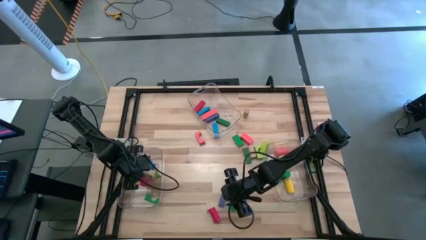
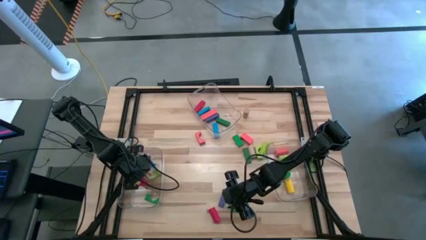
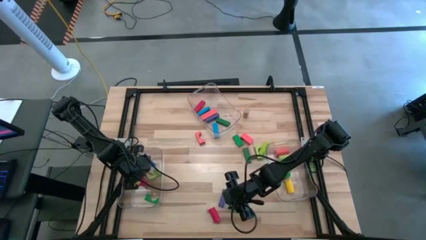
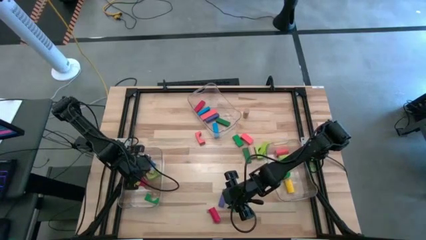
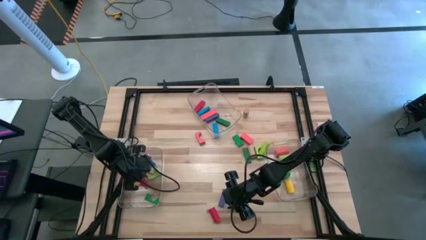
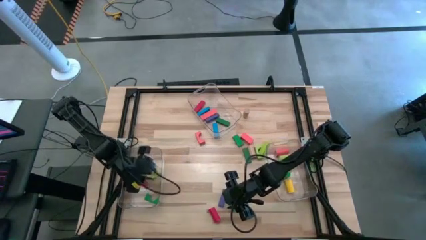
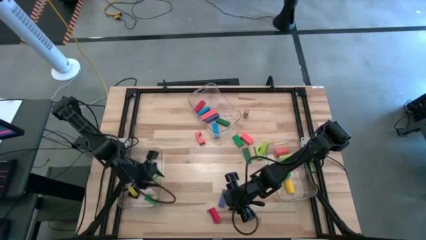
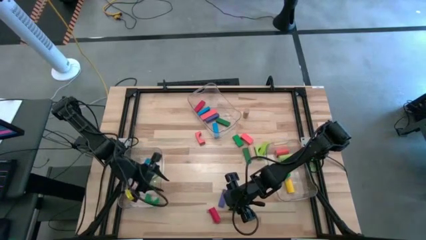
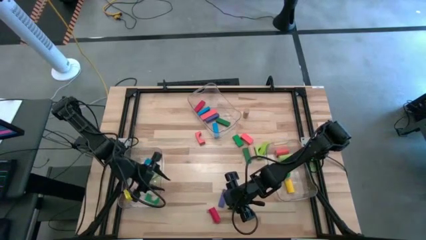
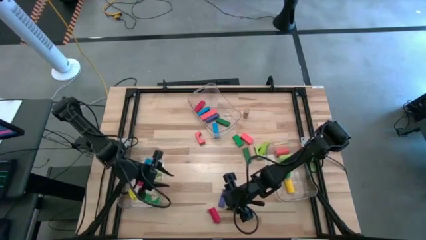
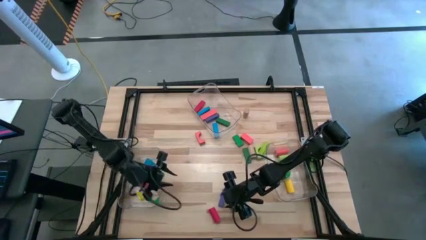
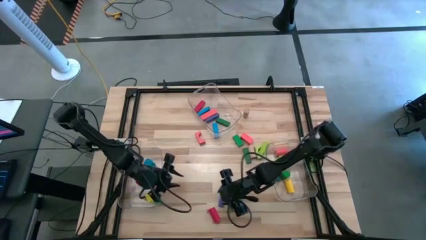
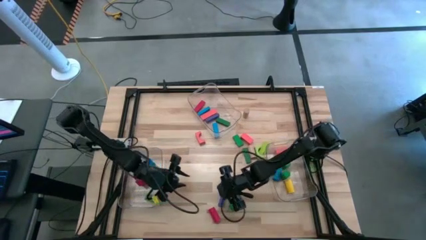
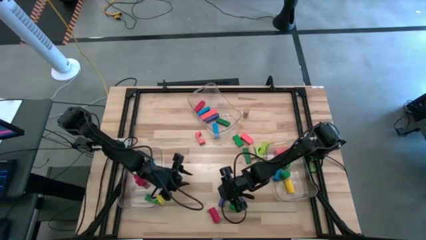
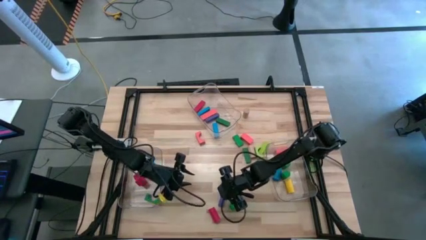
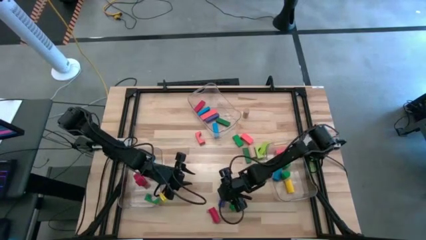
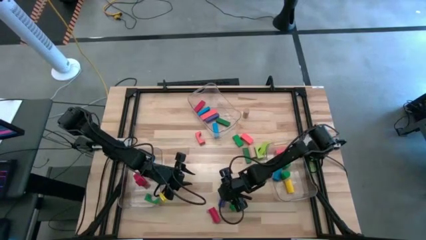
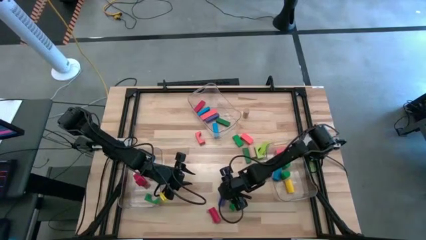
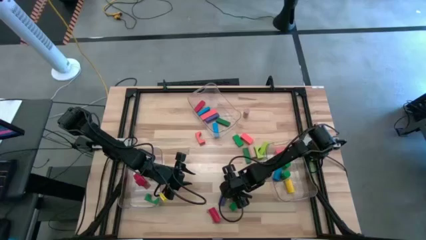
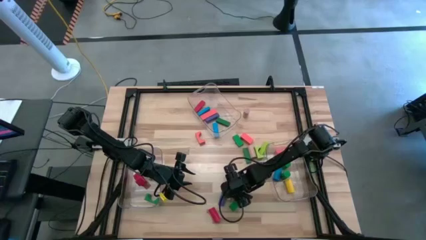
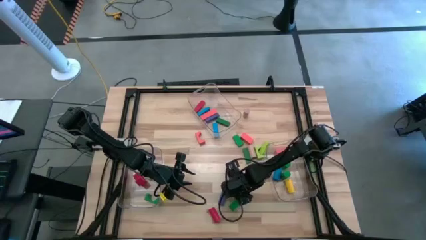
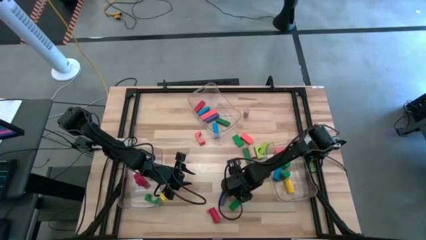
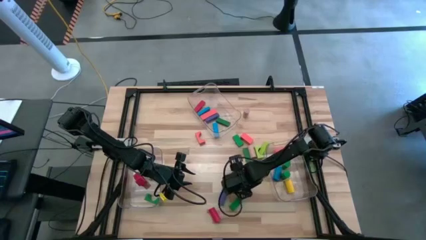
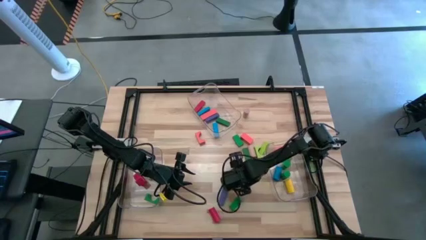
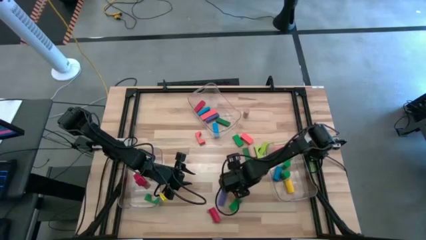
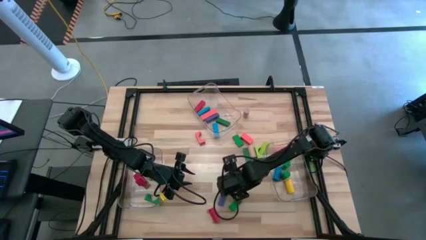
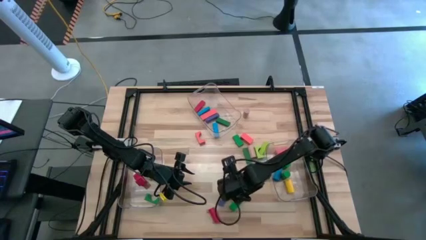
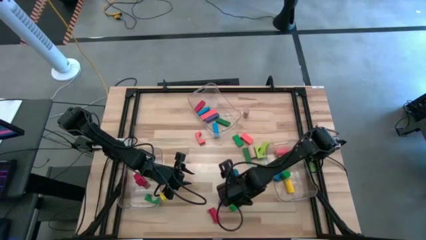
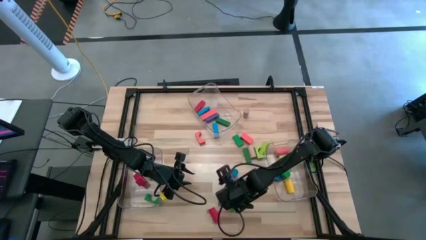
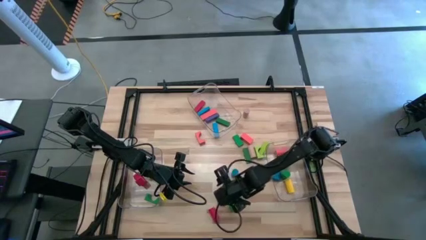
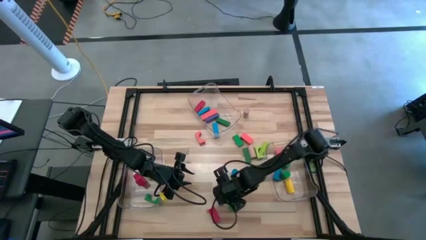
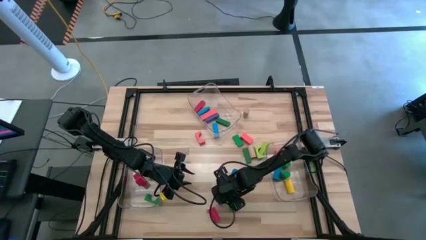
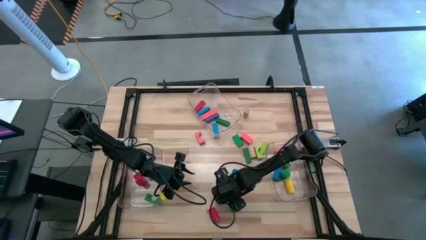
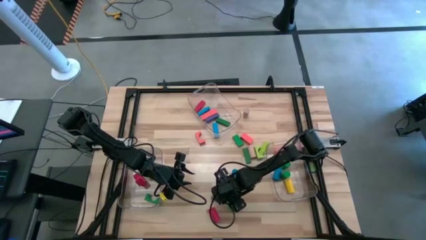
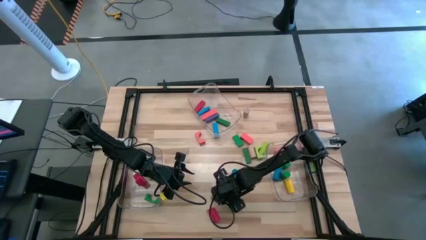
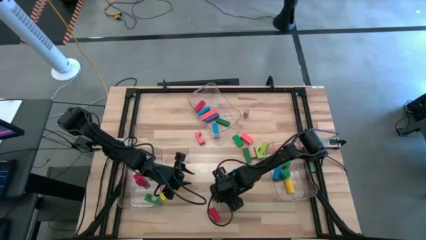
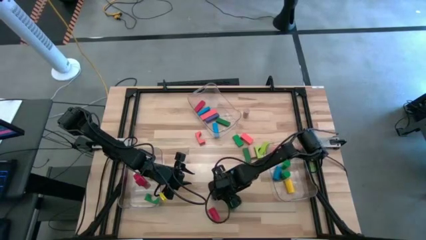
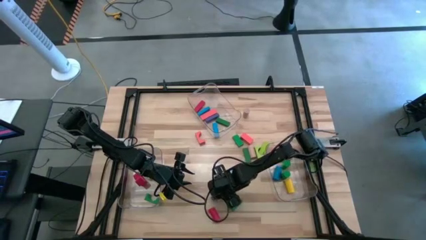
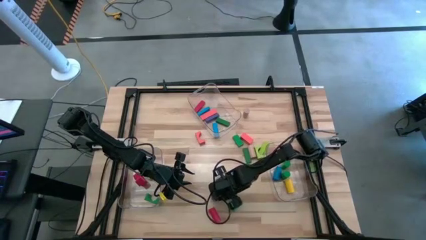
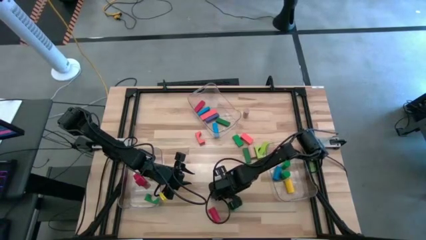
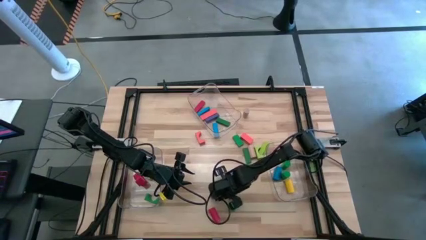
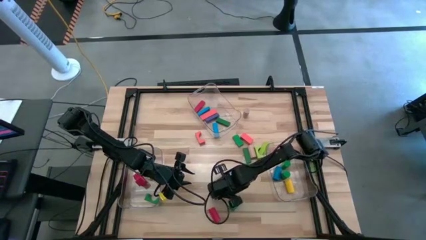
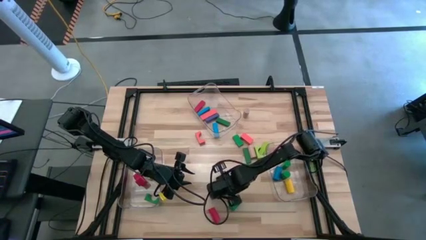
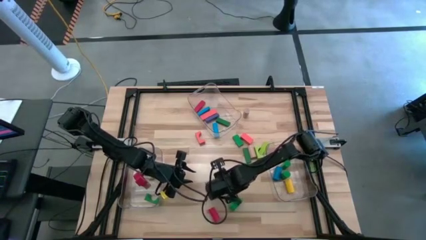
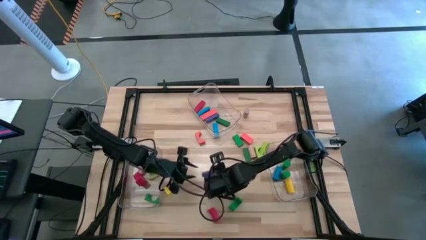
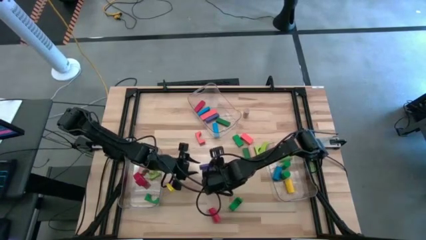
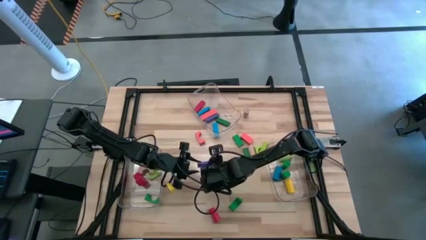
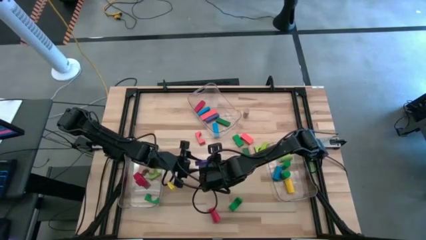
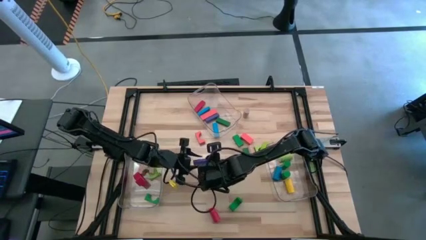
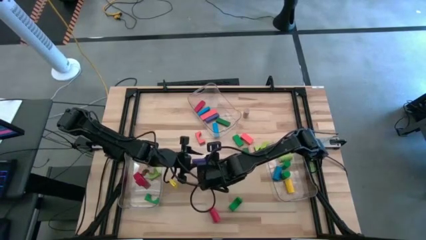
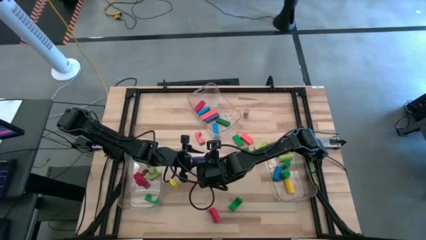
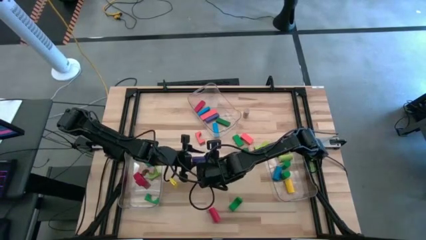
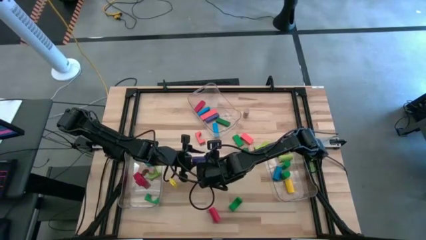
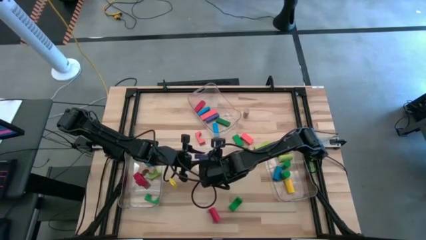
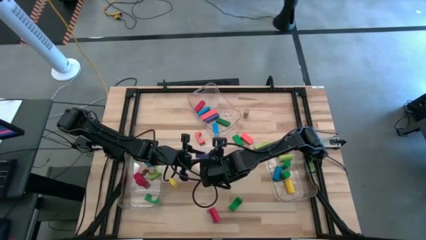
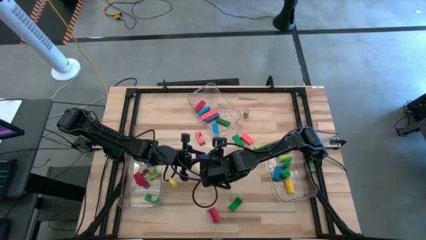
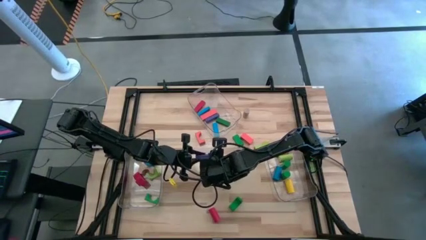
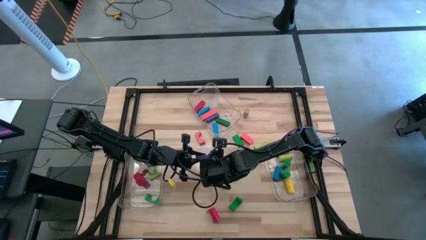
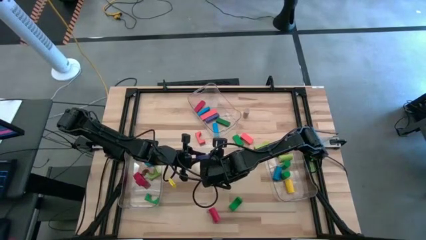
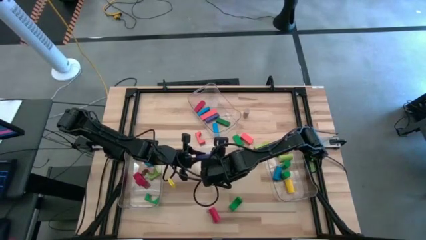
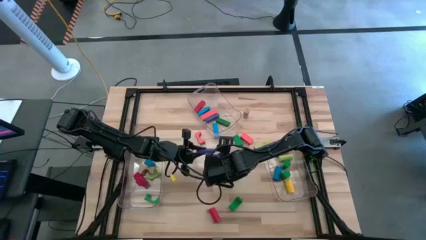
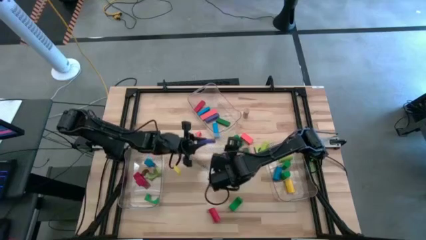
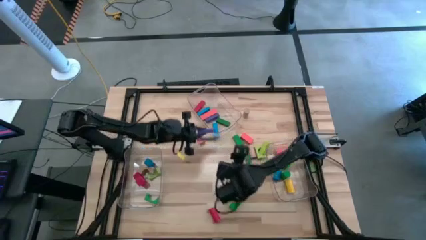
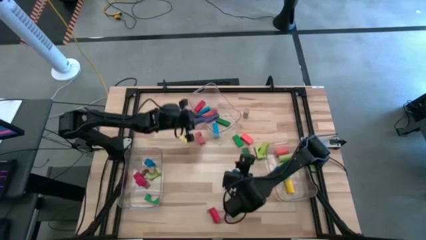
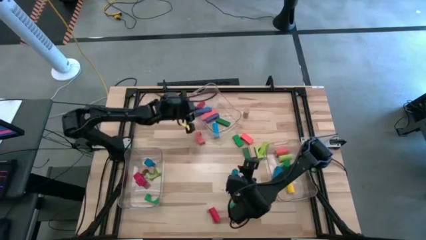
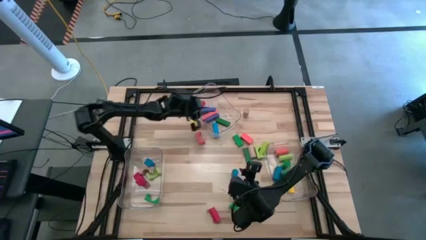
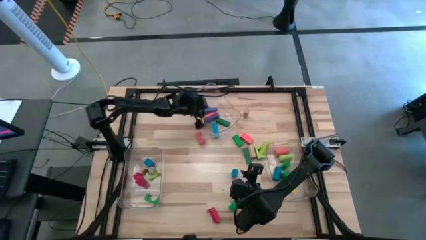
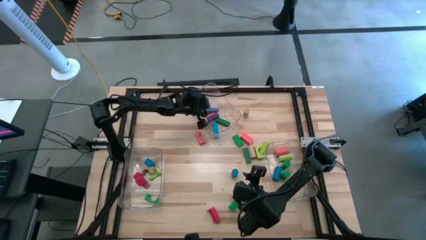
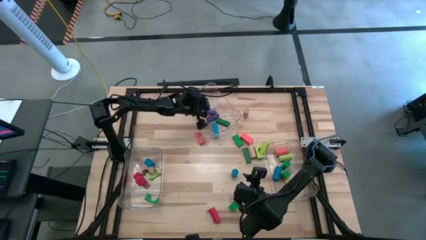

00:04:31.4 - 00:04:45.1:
Task: Sort blocks by size
Put the blue rectangular block into the top transparent bin
